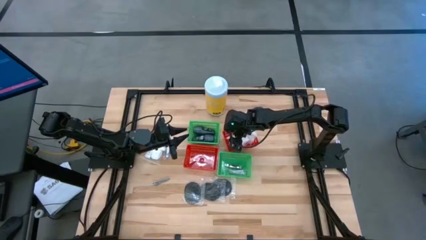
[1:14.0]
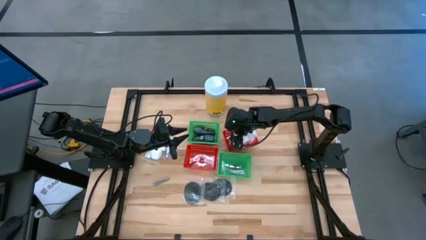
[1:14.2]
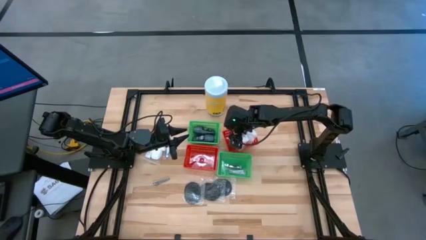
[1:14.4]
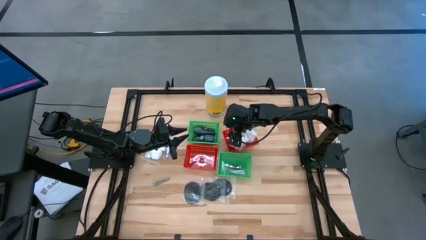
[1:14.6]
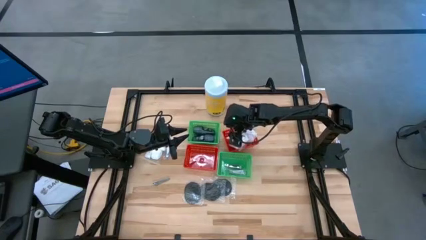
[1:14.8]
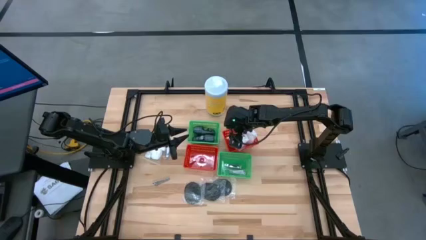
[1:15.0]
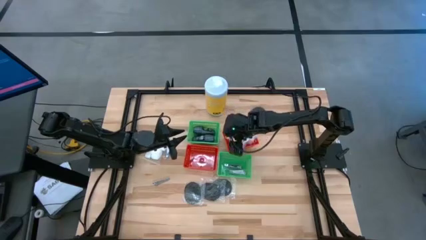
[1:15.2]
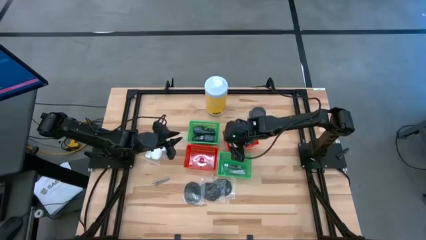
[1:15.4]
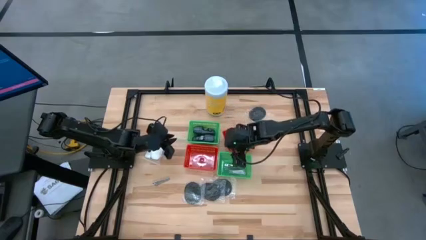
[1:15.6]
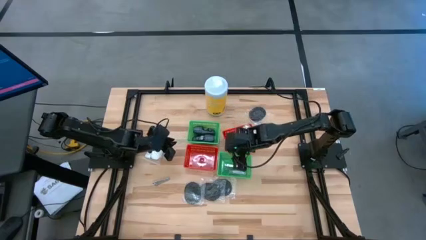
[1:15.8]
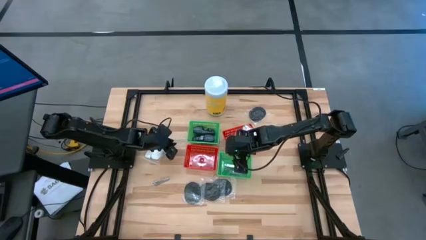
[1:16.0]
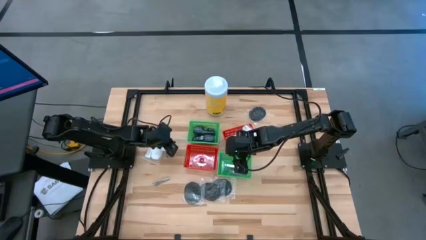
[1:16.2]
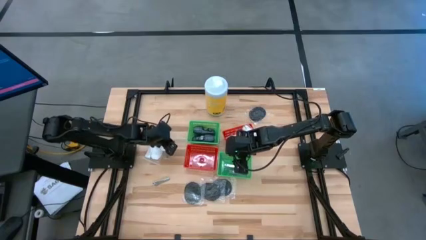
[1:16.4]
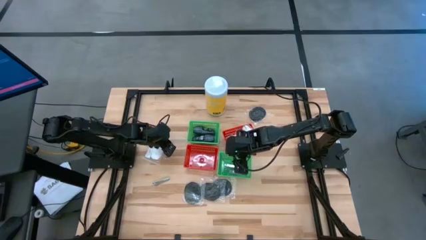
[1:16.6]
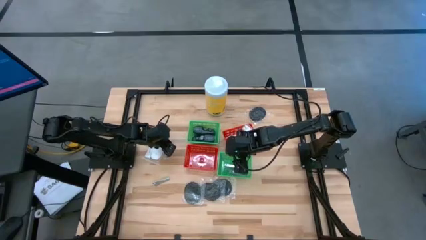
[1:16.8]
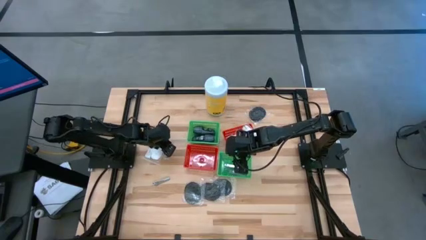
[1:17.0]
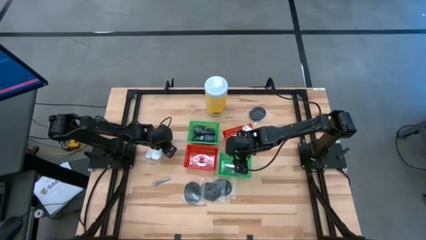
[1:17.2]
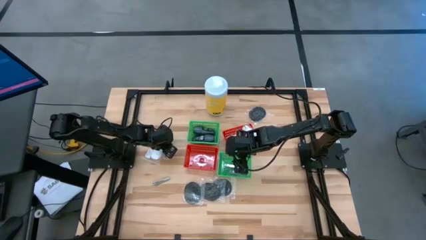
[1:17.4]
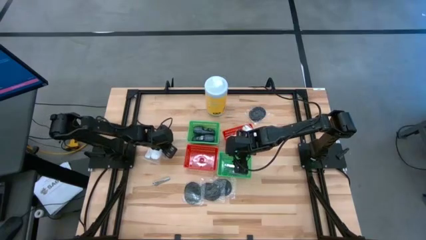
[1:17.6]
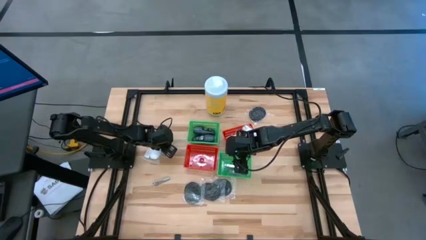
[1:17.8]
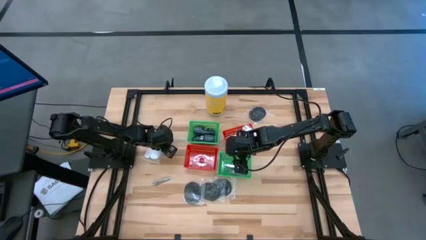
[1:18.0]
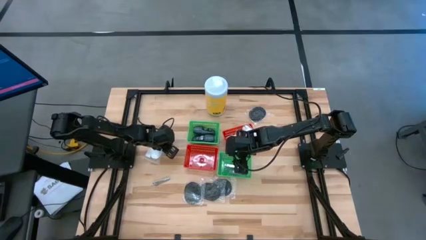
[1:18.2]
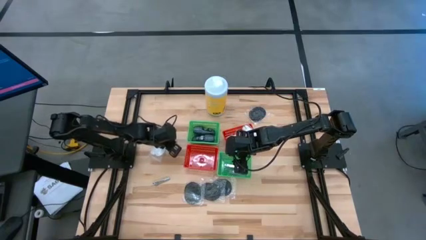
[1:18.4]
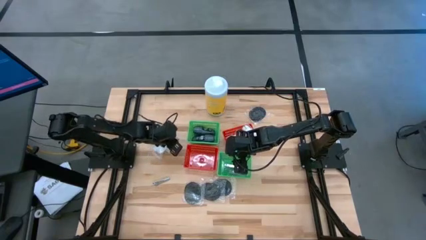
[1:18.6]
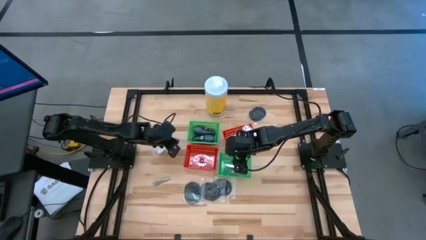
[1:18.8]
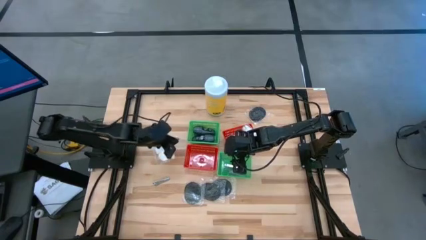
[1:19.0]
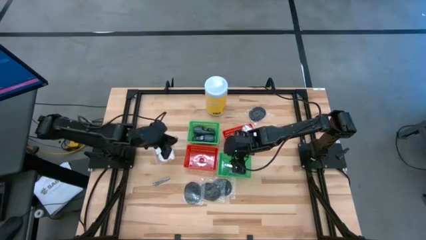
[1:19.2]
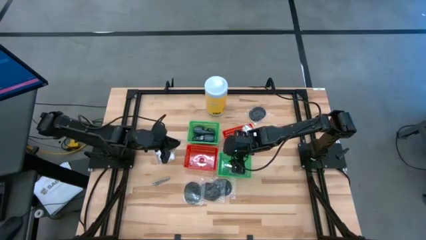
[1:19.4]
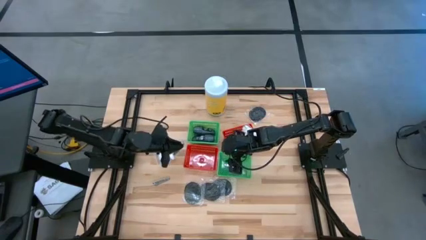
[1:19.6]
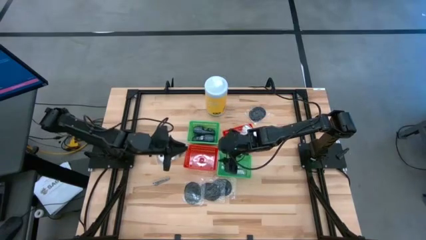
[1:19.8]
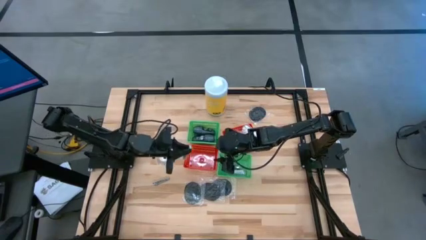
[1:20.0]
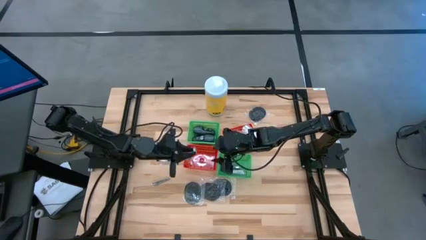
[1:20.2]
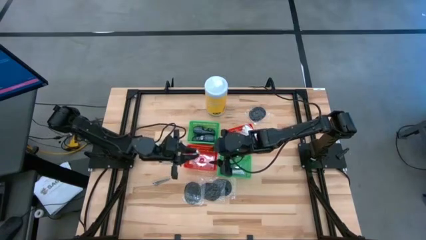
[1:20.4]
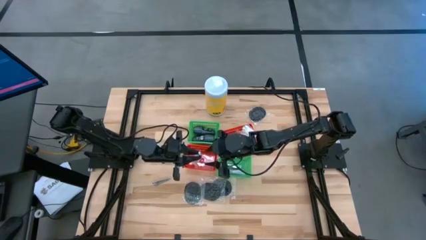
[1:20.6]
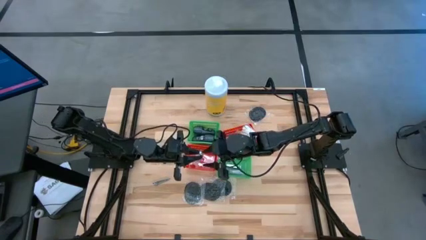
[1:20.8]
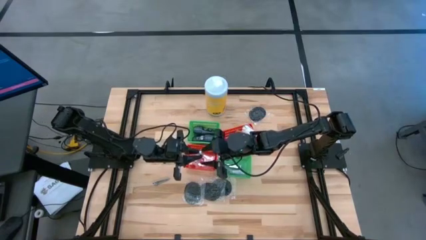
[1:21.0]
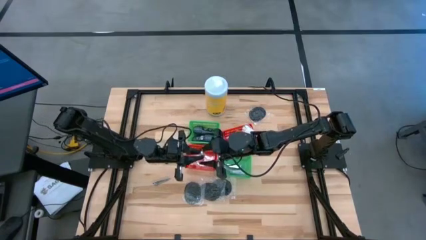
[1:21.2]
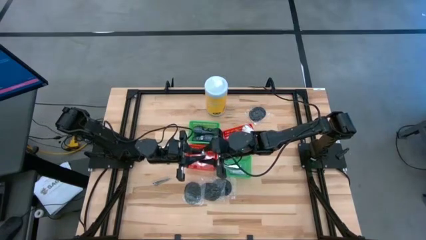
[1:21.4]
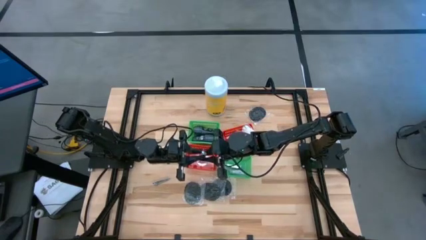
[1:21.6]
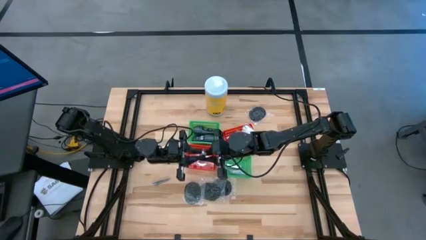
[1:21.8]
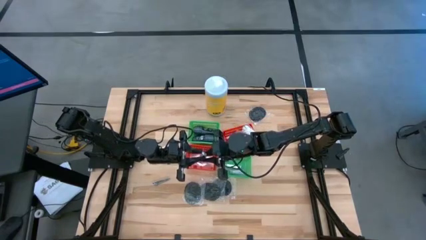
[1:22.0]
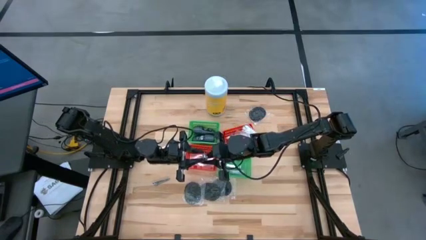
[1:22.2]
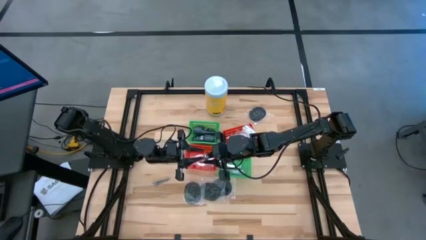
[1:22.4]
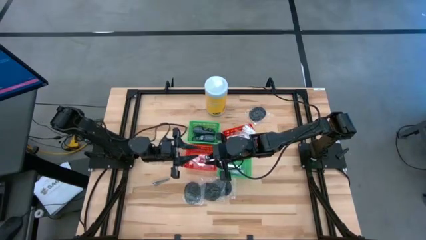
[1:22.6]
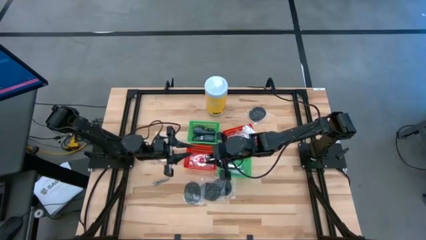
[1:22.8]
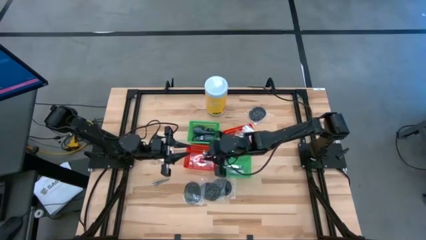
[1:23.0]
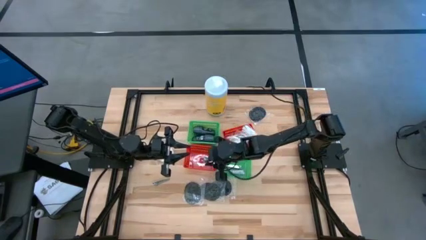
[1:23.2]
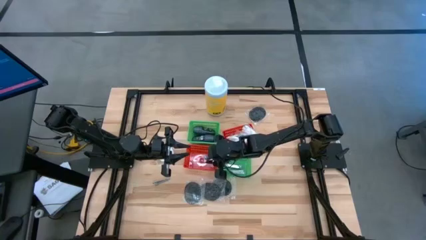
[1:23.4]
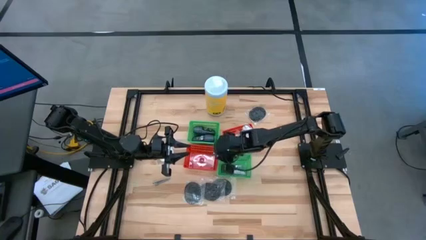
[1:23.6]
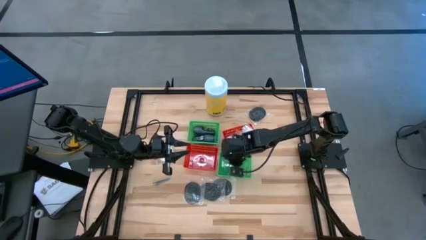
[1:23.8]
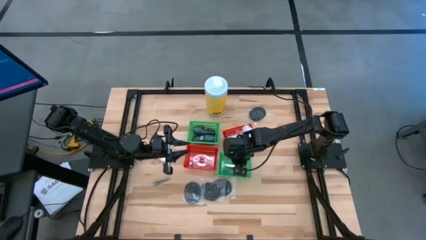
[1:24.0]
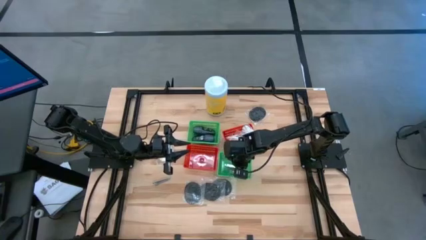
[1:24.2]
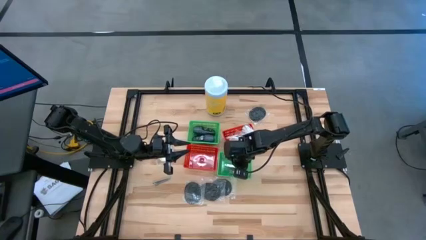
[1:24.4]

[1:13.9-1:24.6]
Task: Pick & Place Travel size toiletries
Put the nail cutter into the right green bin

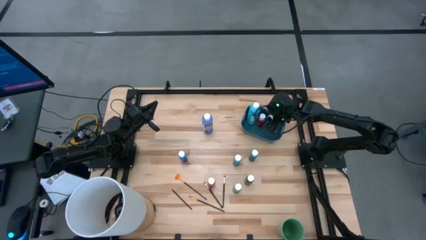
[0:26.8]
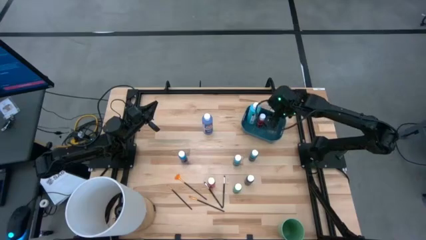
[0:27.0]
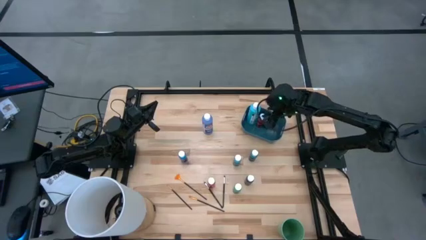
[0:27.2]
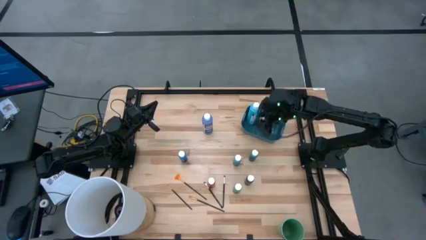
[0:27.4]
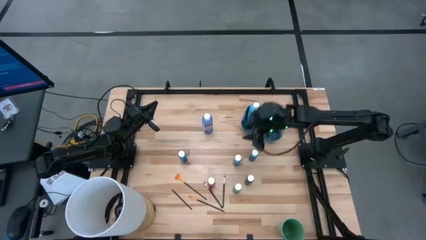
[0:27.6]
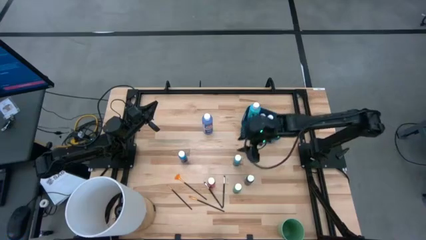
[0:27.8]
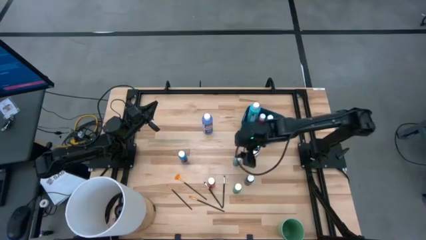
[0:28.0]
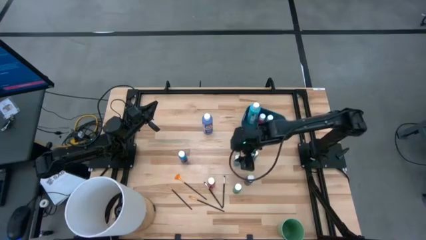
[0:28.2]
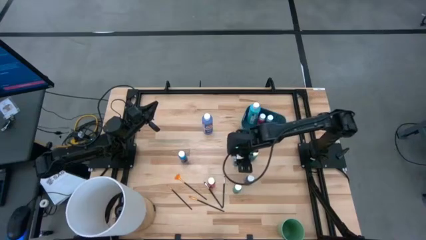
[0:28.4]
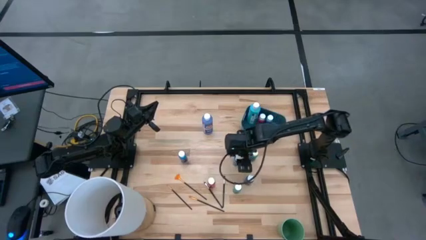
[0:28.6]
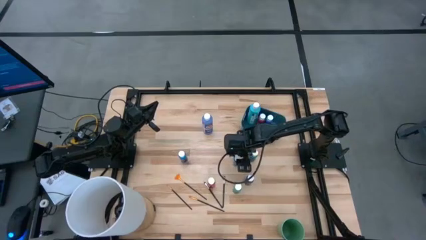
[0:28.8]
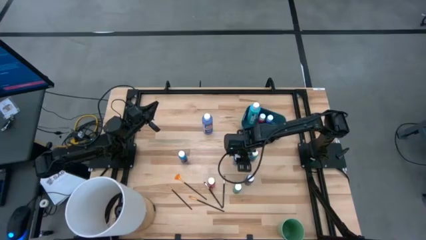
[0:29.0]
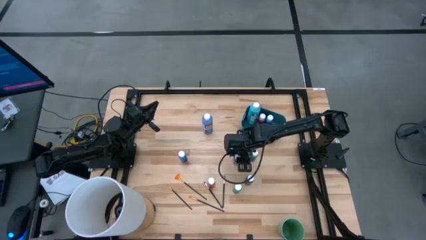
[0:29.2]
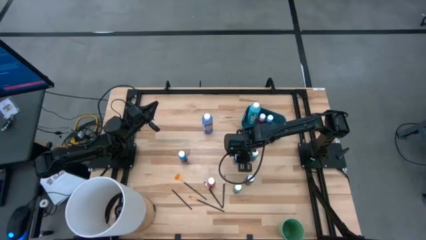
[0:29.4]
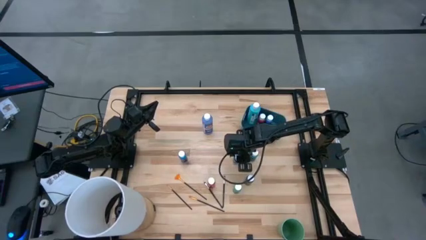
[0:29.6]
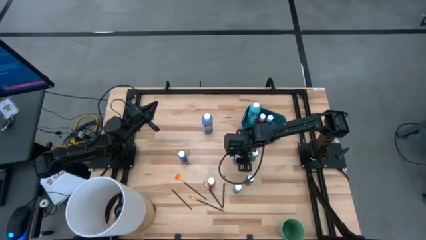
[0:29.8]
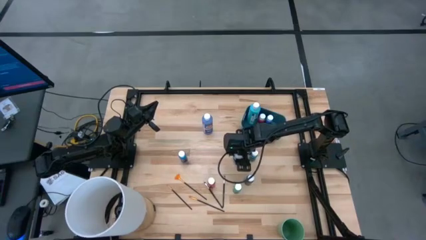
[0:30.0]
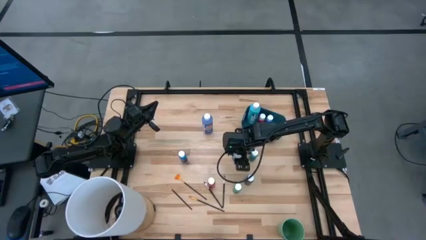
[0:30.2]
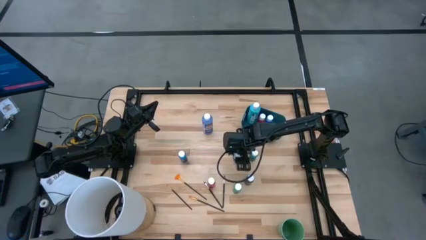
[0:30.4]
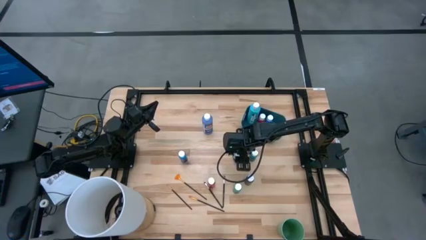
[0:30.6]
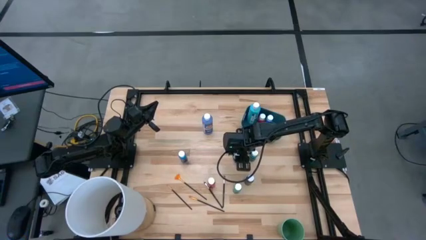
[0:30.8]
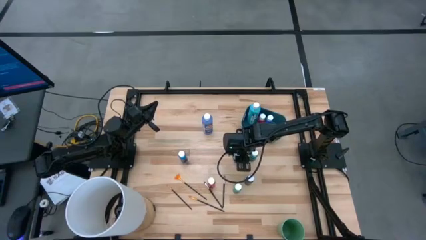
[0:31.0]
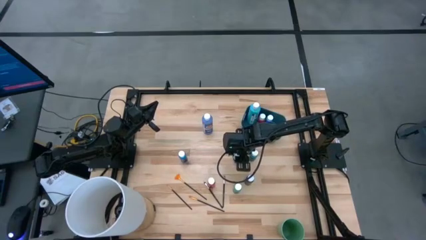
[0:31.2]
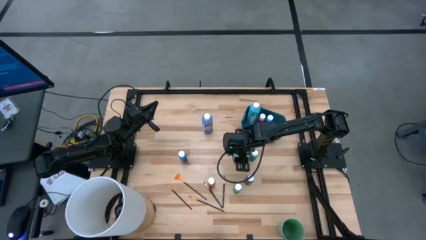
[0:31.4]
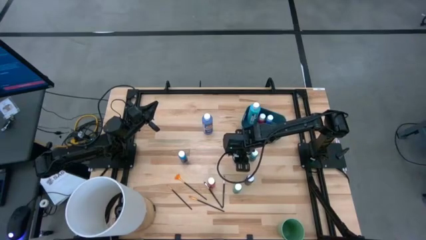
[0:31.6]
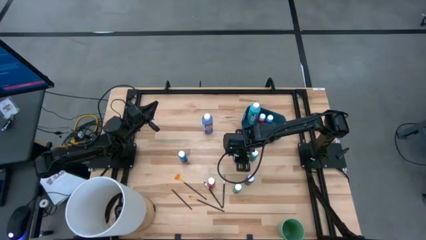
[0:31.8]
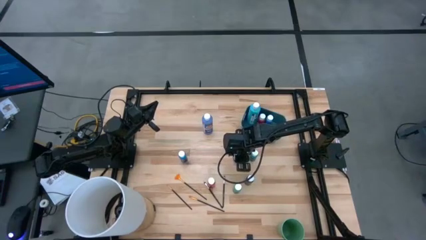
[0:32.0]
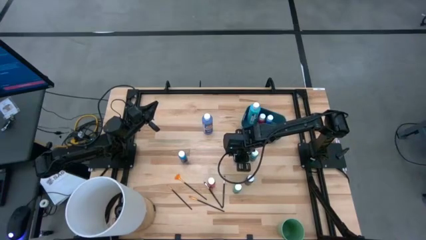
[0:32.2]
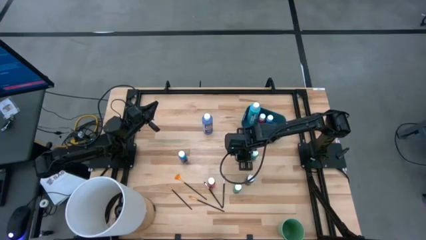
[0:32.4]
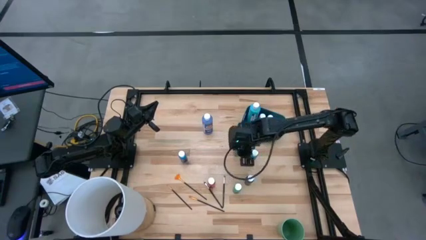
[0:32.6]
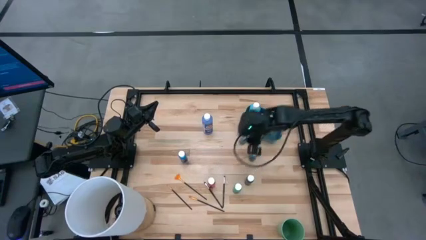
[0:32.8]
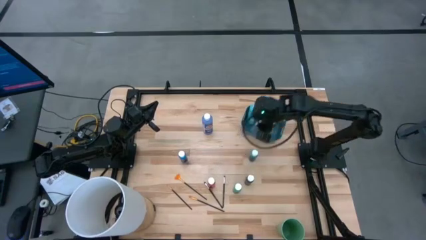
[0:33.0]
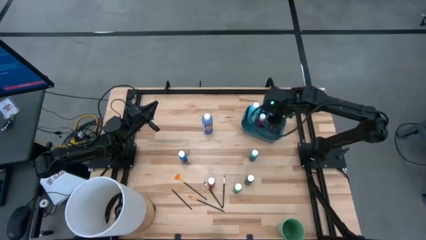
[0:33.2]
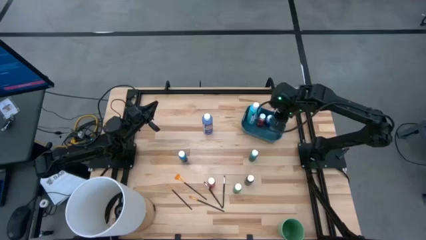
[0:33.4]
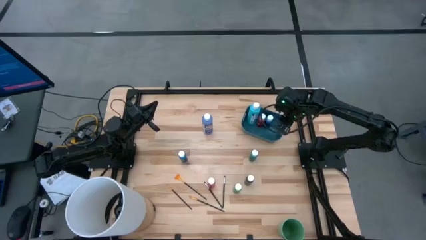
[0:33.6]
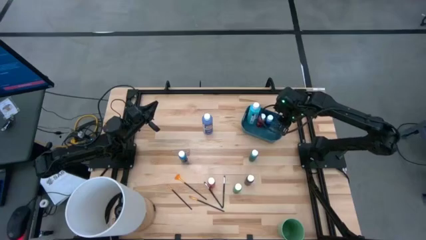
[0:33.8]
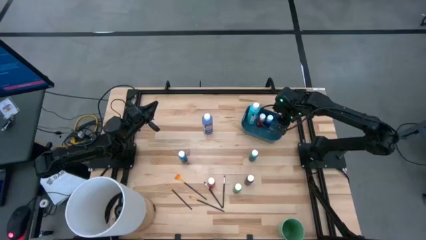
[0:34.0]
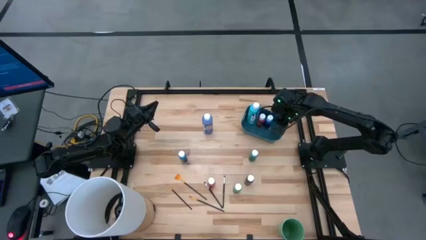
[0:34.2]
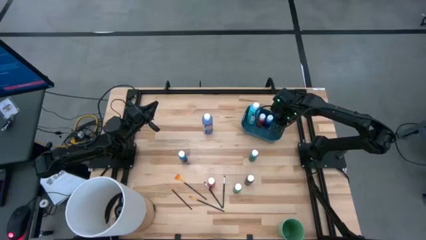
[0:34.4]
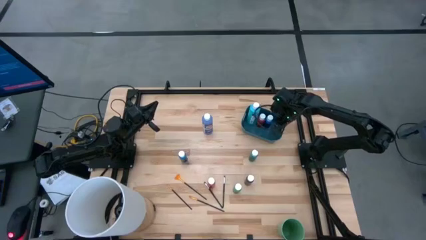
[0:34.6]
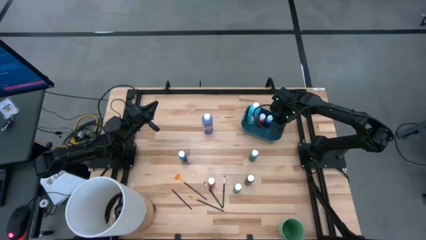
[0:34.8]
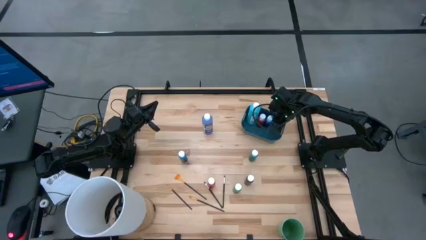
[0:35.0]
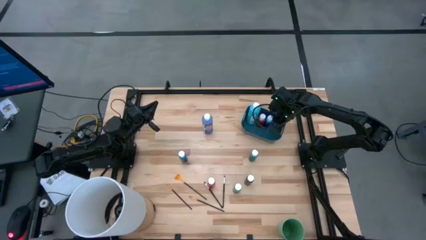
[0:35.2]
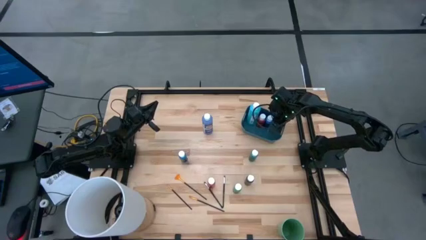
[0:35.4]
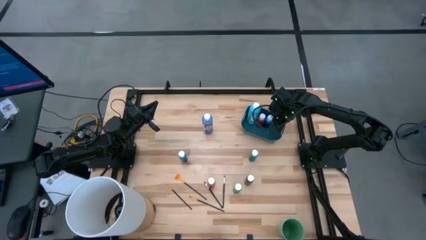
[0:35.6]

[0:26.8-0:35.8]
Task: Pick & Place Paint Supplies
Put the small light blue paint bottle into the blue bin
